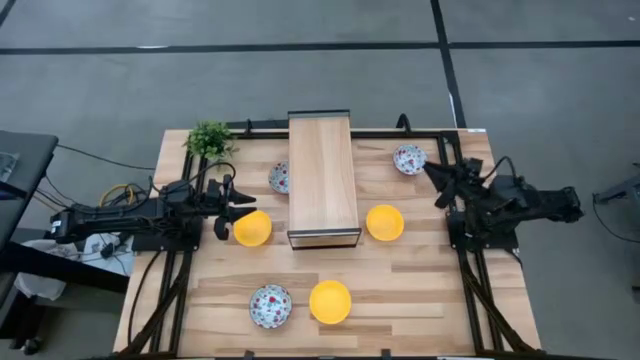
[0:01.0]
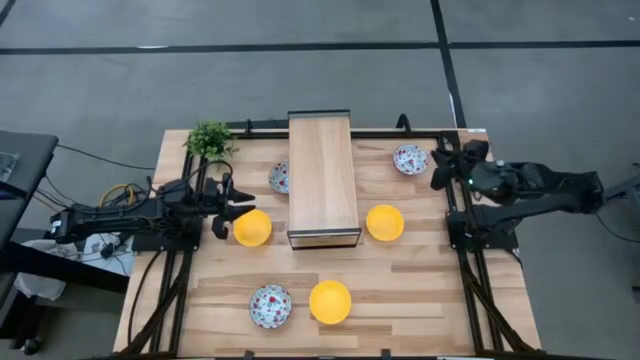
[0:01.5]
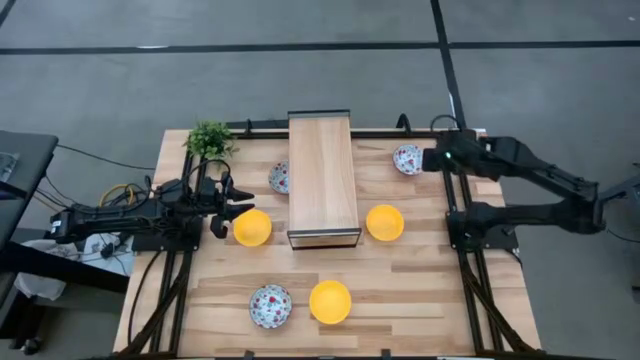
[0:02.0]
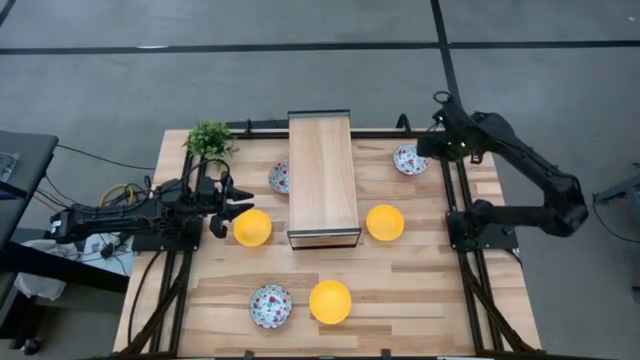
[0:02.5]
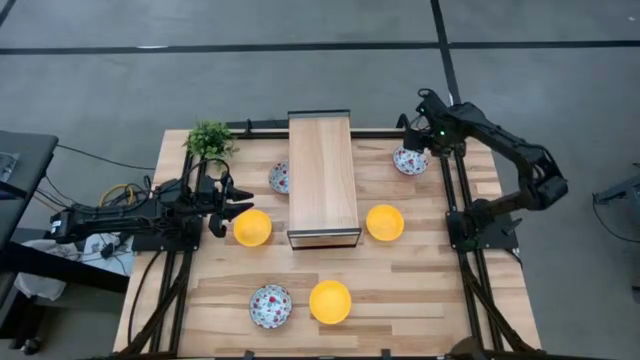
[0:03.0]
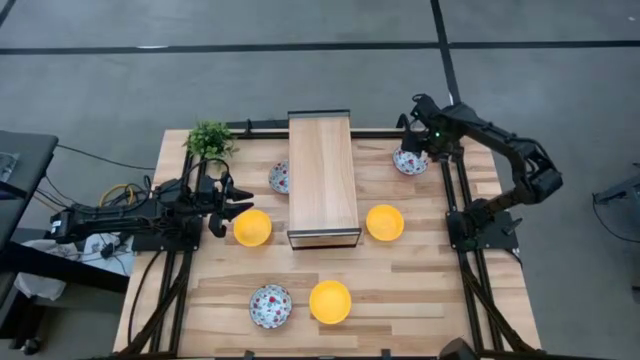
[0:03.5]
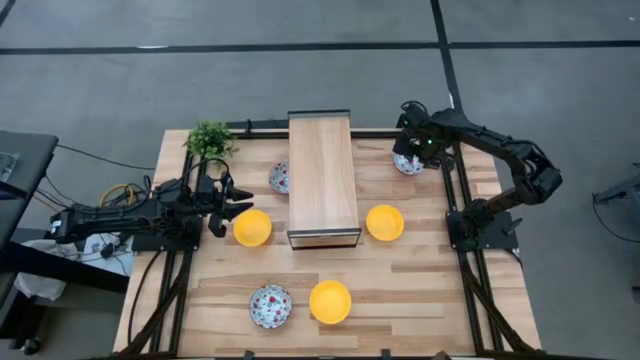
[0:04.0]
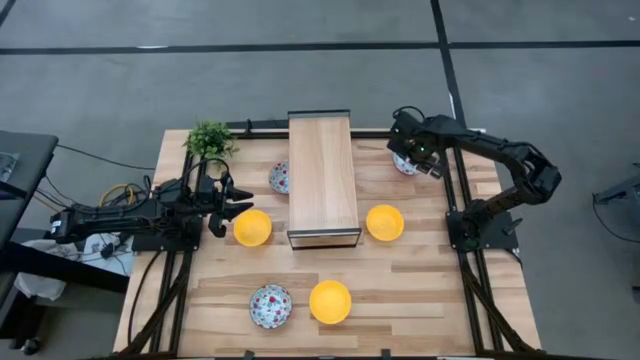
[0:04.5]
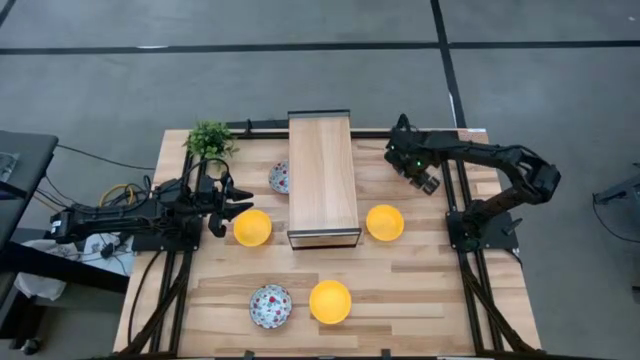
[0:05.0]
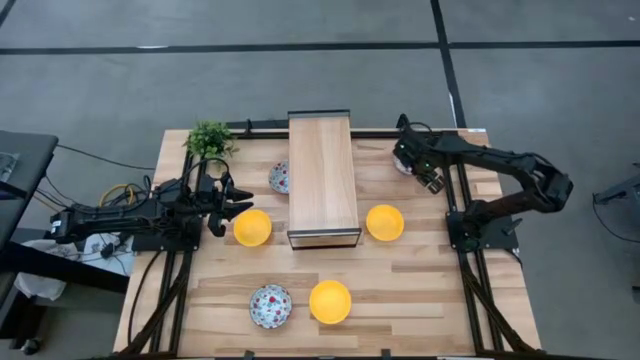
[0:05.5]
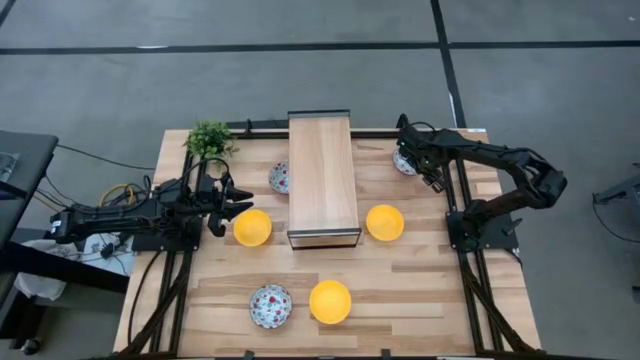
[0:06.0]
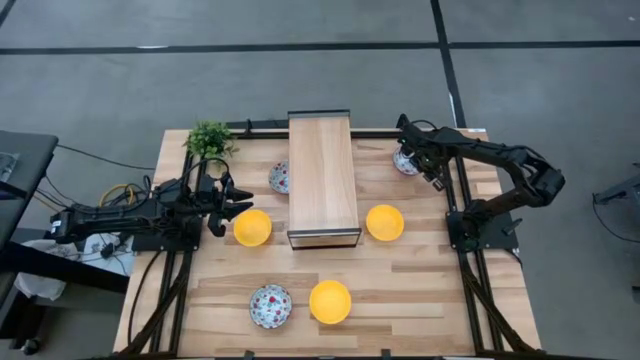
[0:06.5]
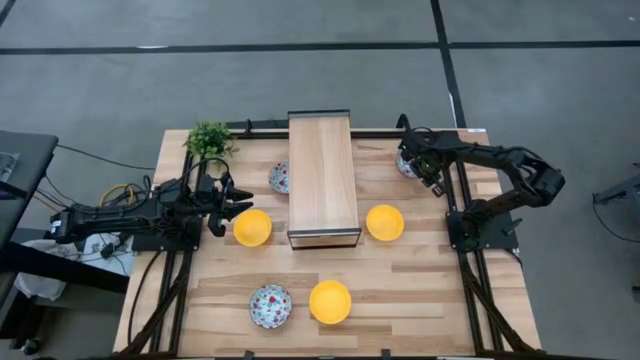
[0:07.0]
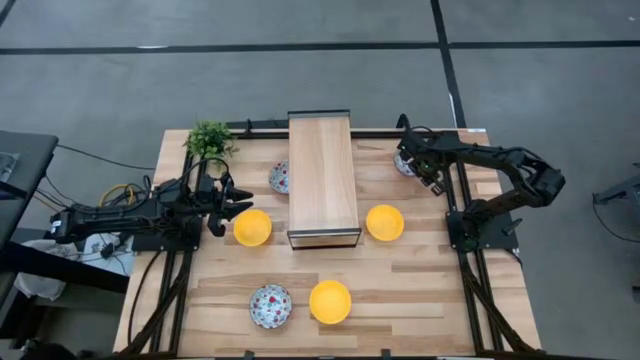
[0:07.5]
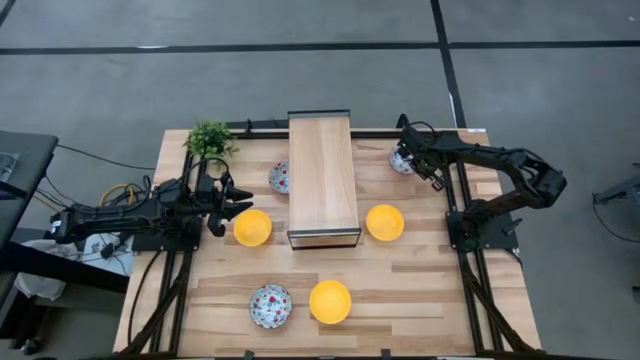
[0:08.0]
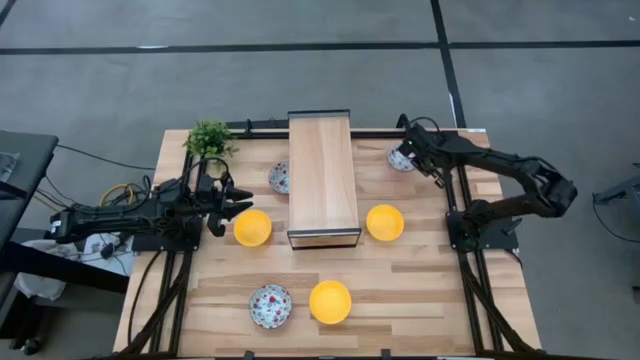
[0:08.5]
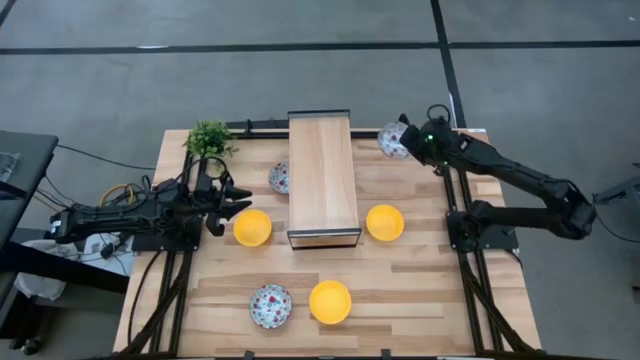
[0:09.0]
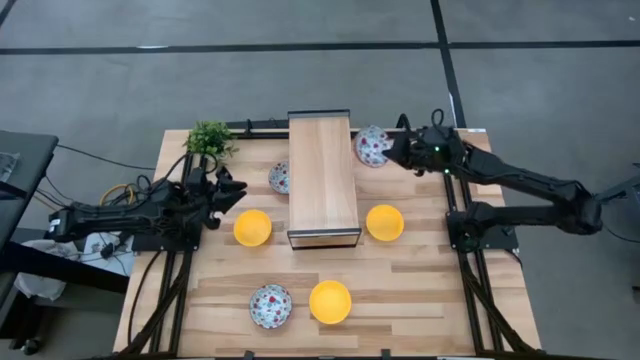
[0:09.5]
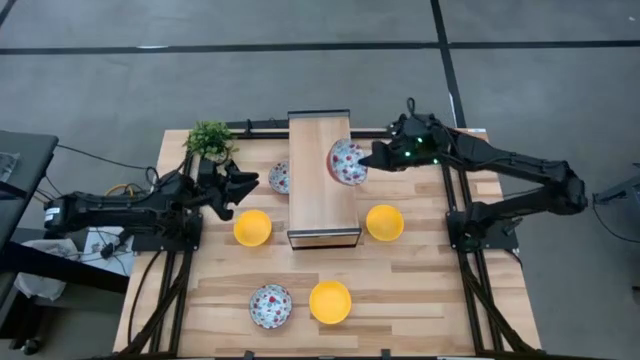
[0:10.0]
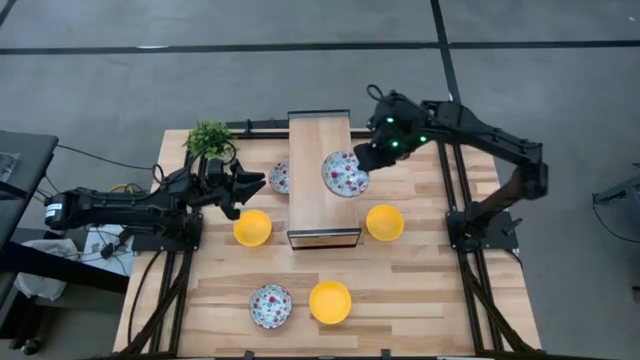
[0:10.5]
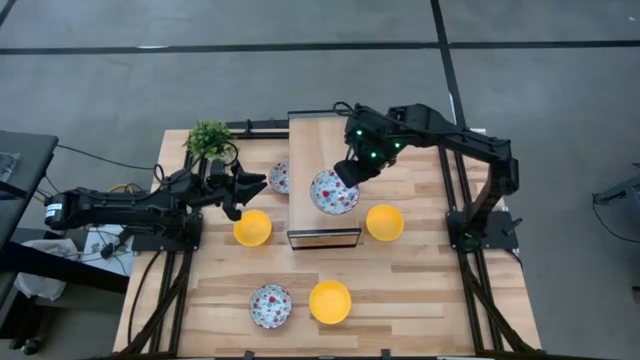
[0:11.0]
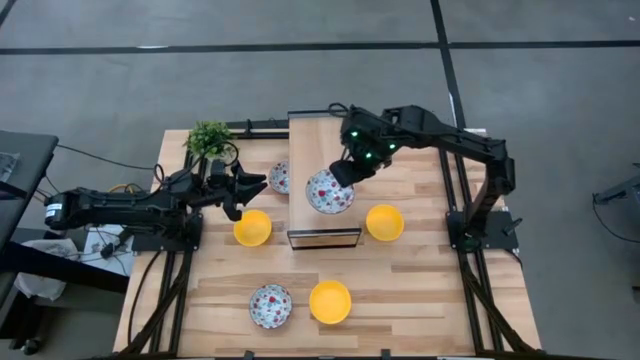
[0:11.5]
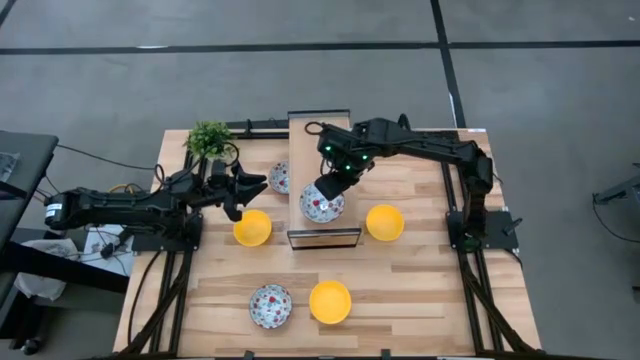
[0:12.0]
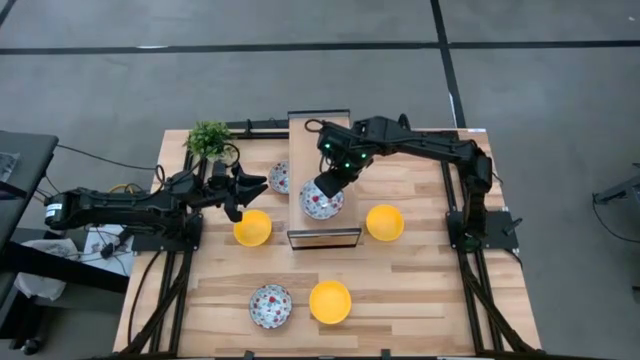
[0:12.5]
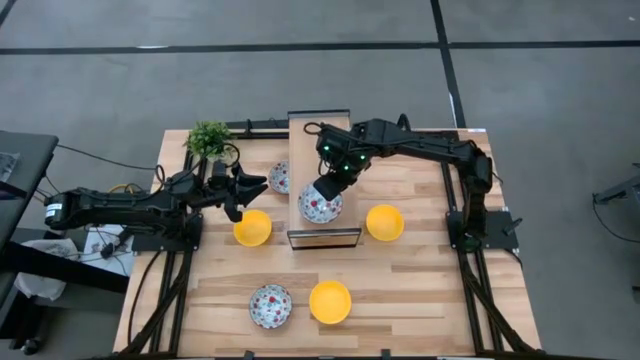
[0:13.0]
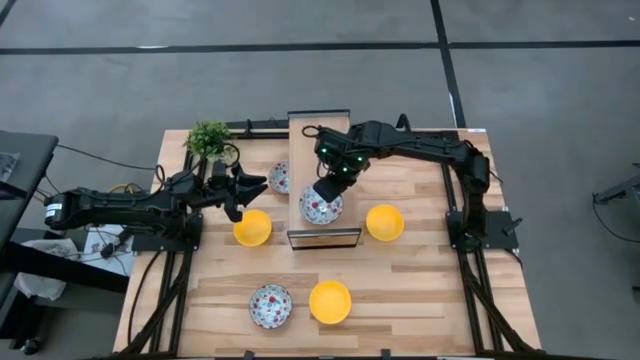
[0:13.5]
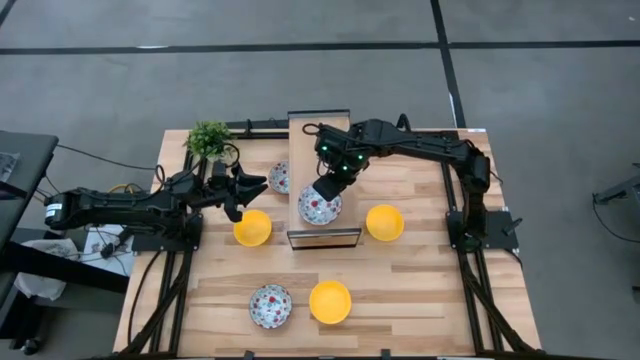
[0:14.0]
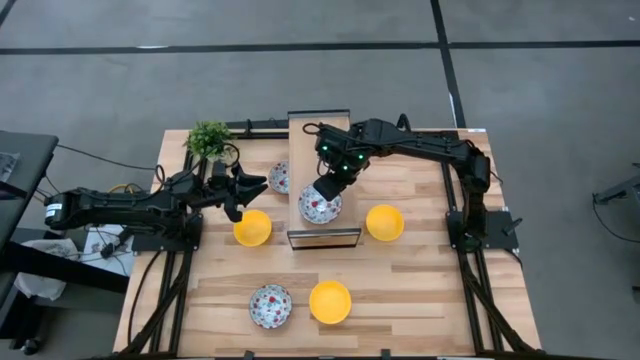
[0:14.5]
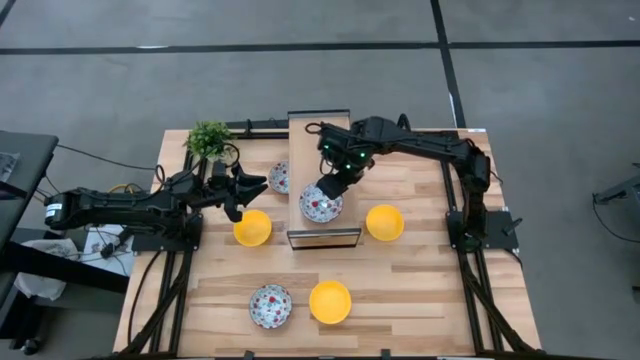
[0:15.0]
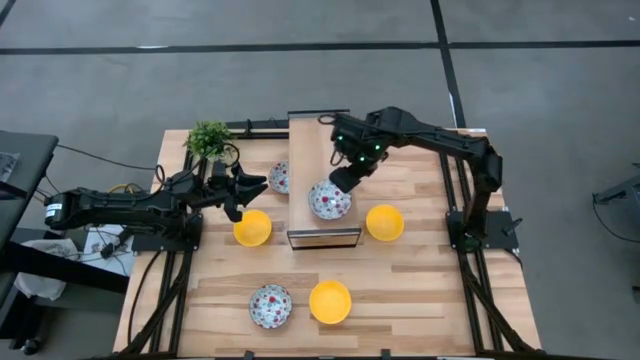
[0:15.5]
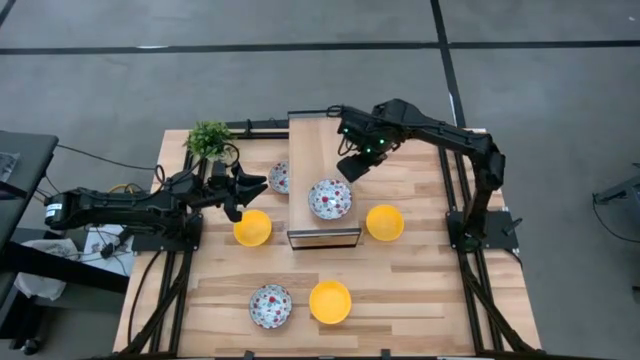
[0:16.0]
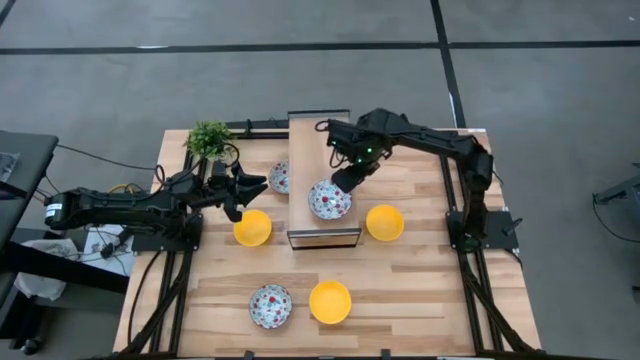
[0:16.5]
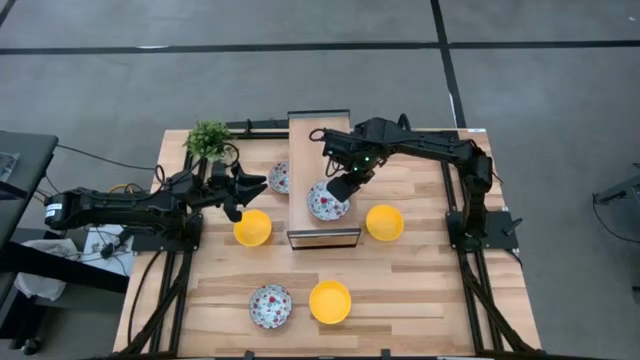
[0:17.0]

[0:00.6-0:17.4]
Task: Pick & Place Mini bowls
Put the right red patterned bowl on the shelf
